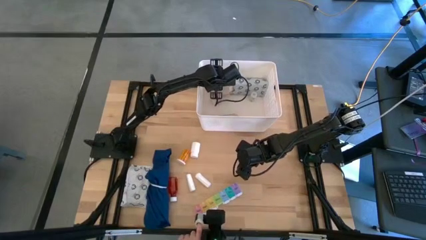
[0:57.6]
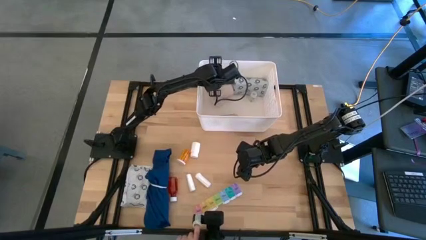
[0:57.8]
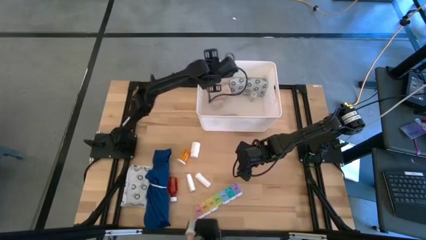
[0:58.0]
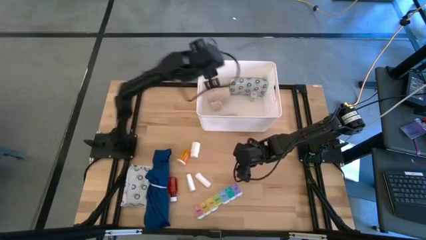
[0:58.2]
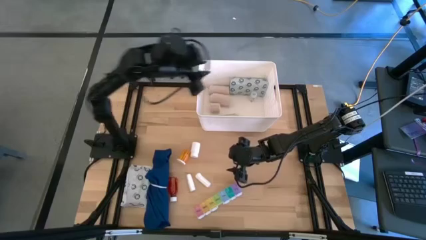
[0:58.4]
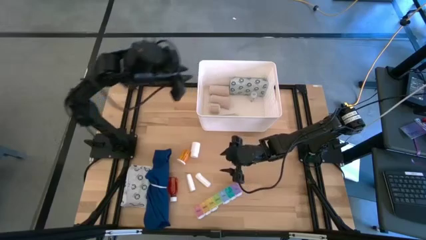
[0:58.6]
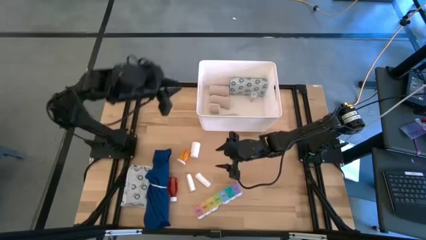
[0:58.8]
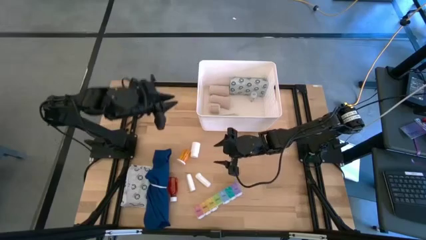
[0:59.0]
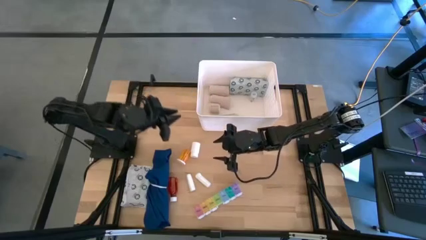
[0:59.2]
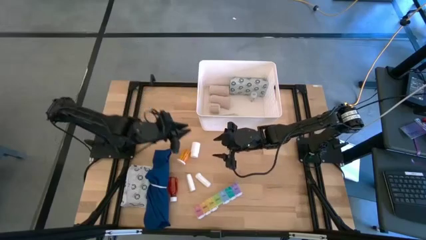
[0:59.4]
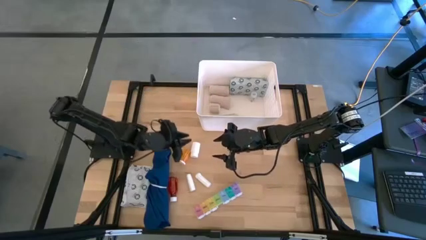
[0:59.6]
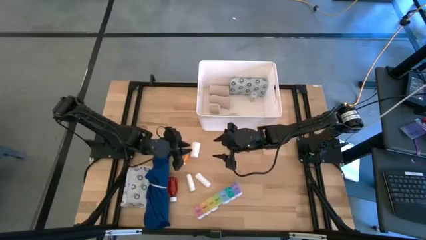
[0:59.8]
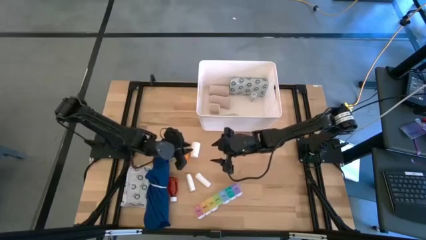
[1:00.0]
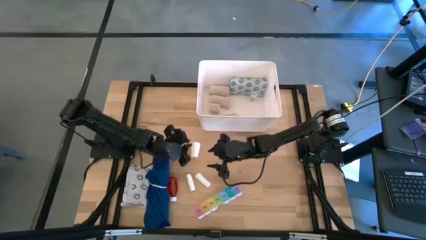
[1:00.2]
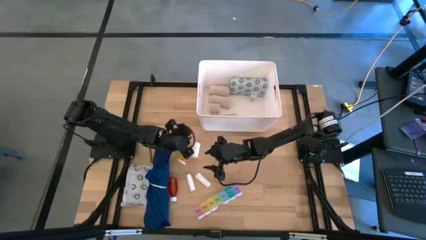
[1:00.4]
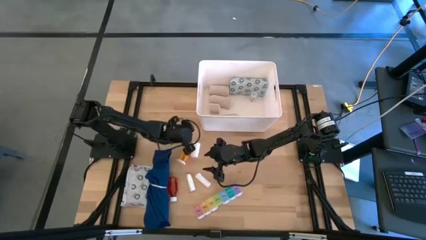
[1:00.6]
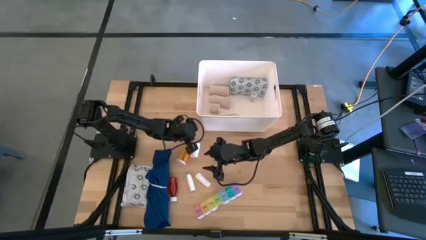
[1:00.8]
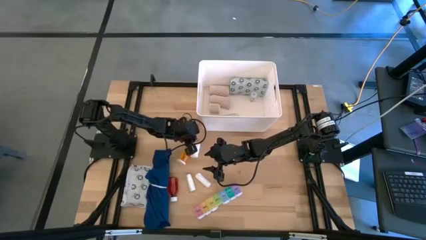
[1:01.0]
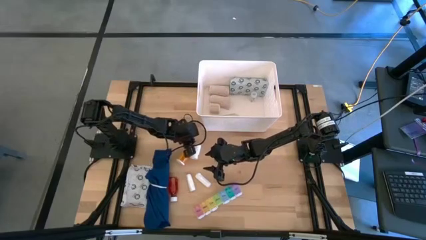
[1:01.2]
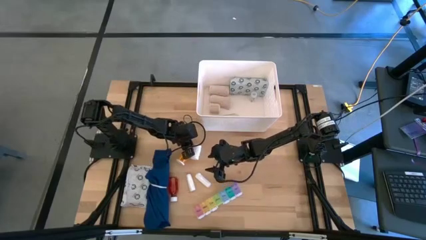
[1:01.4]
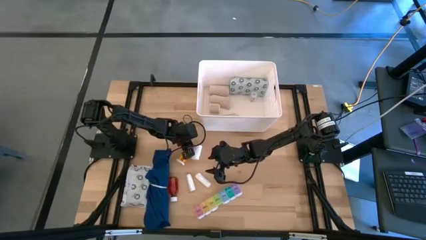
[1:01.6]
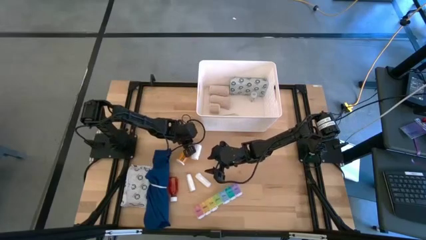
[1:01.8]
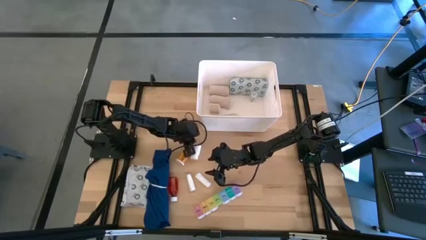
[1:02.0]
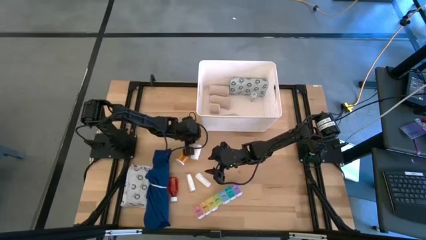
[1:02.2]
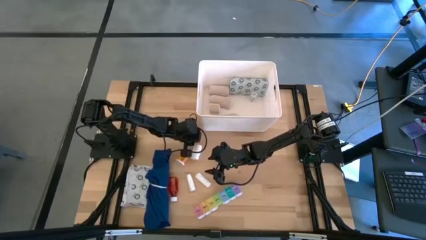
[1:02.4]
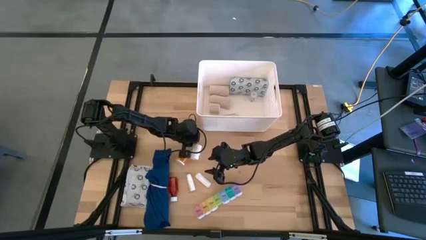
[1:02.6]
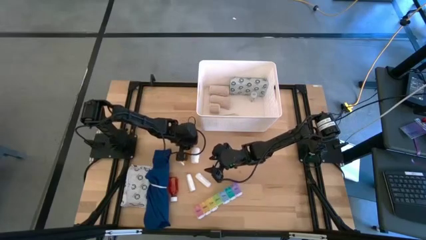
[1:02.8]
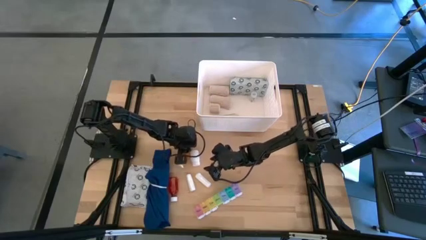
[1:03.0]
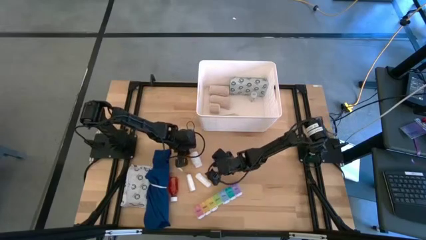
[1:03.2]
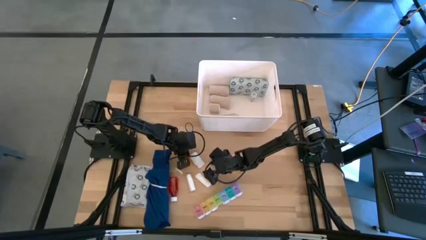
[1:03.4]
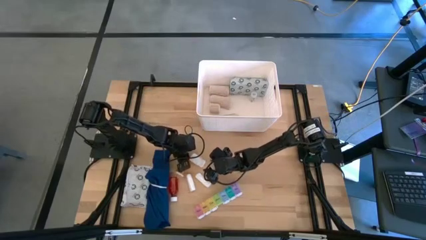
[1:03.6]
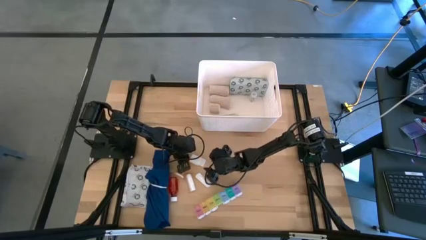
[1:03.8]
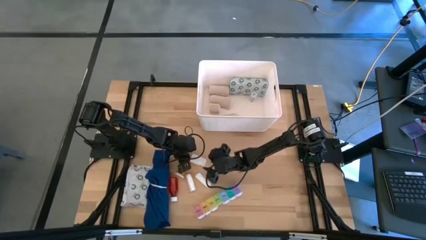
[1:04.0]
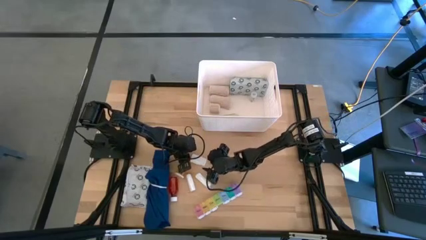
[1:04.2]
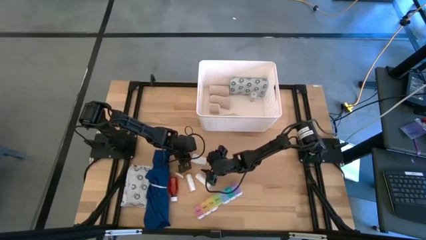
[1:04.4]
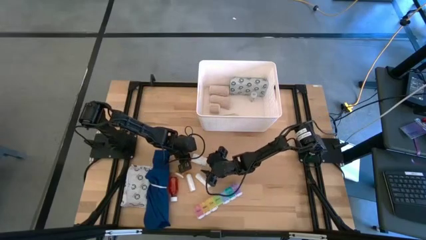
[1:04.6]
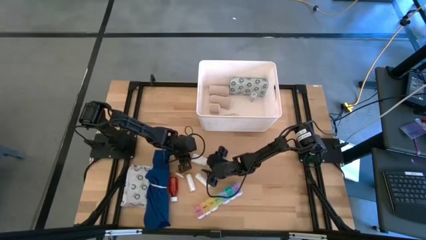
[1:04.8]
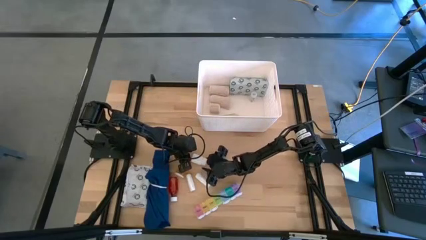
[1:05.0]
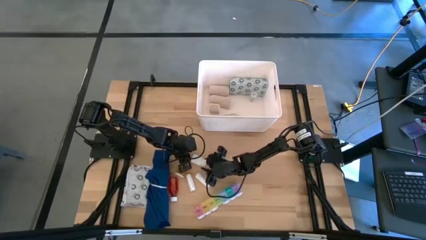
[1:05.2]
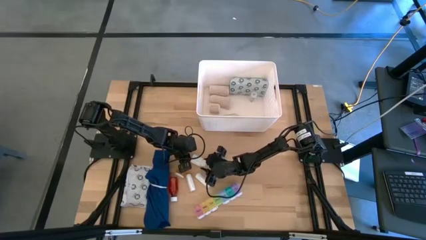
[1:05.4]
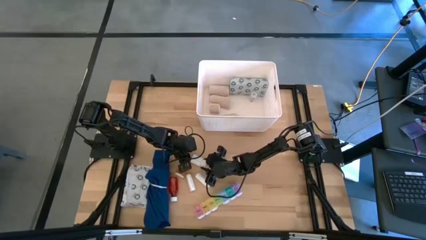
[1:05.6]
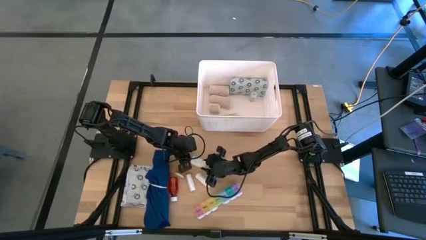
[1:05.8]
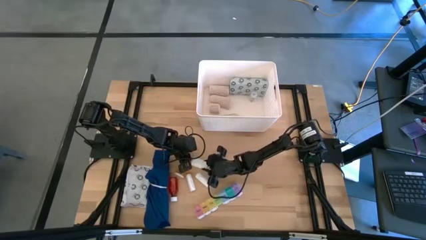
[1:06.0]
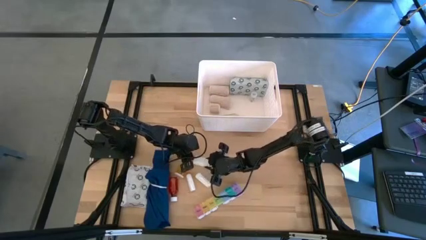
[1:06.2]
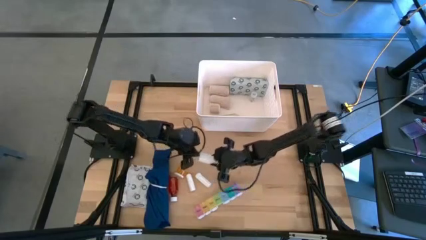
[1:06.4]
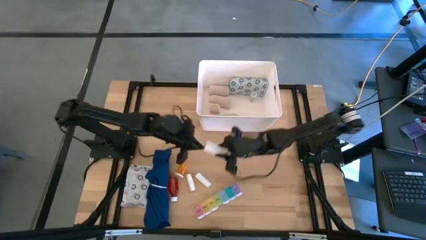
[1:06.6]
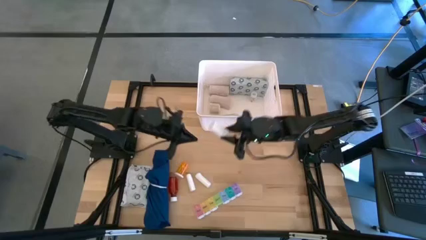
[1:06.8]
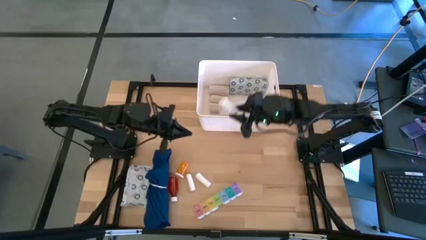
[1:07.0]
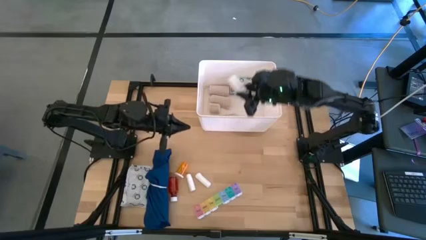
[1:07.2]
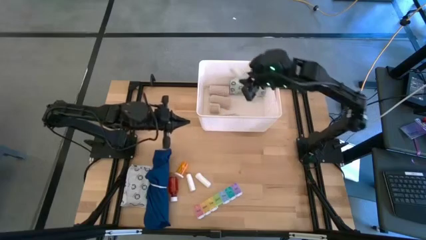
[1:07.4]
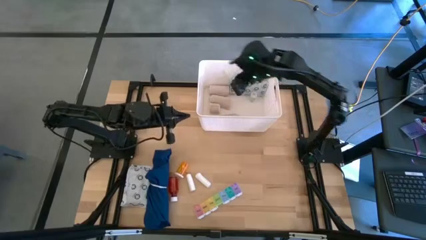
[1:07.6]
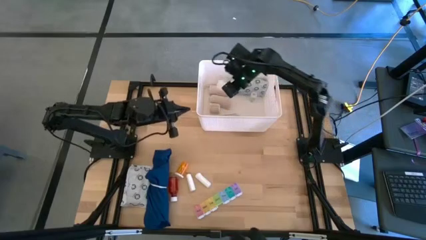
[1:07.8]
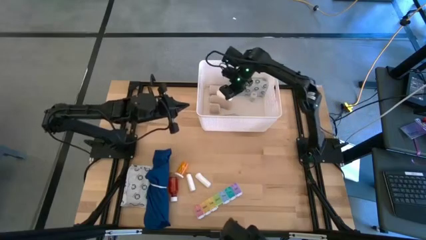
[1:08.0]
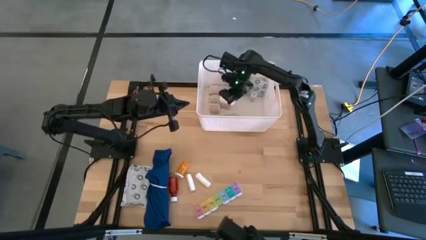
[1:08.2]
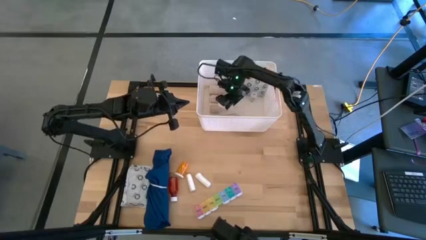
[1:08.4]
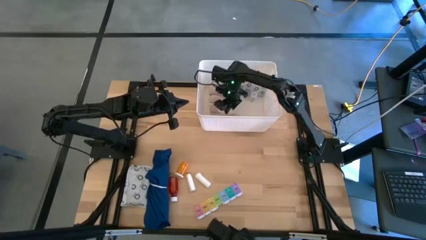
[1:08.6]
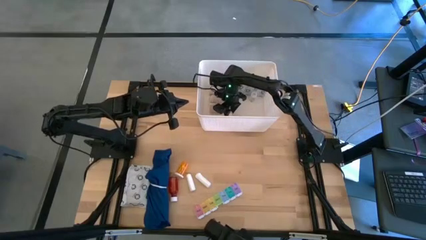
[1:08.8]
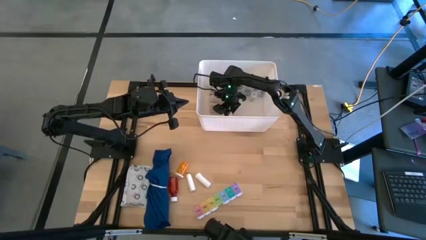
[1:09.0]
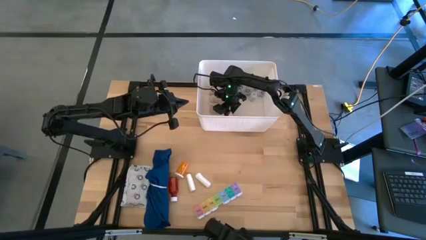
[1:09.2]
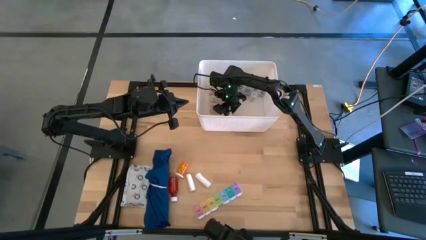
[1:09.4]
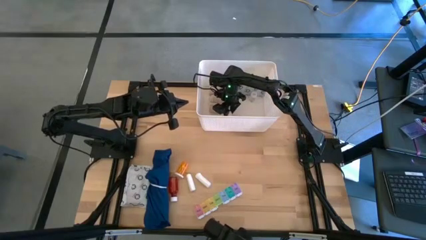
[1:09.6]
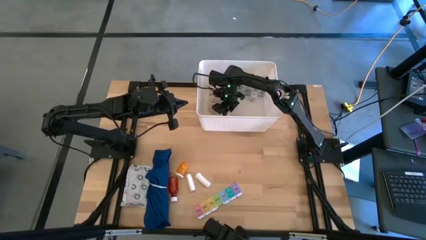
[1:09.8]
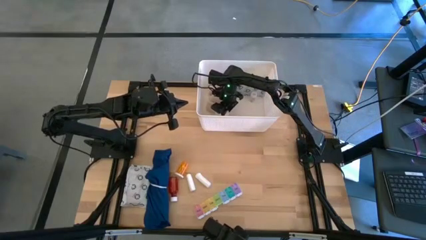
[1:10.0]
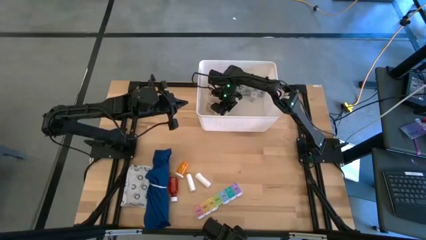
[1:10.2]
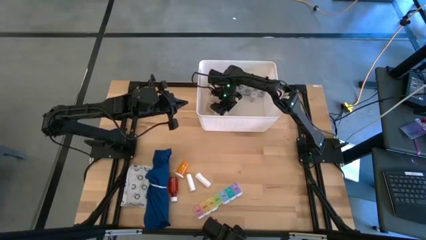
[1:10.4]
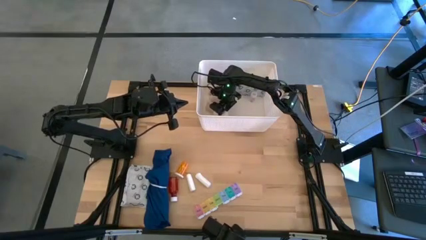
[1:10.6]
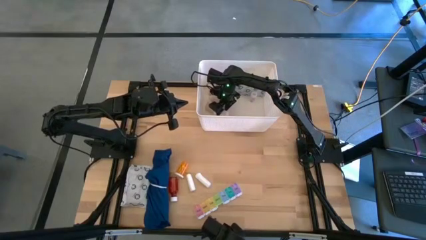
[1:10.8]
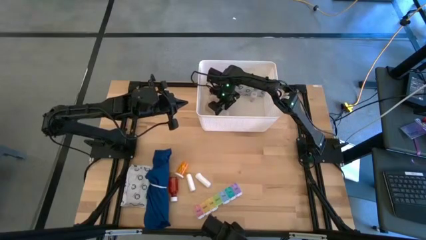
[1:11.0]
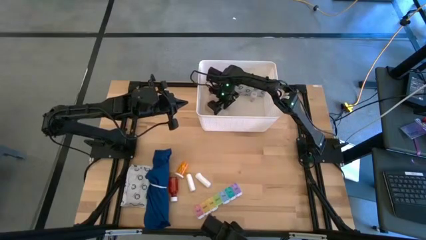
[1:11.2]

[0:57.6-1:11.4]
Task: Pick & place medical supplies in basket/bin
Put the white pill bottle into the white container

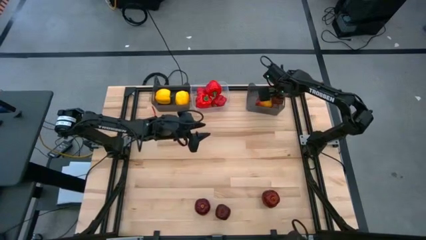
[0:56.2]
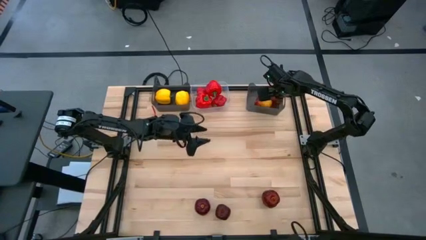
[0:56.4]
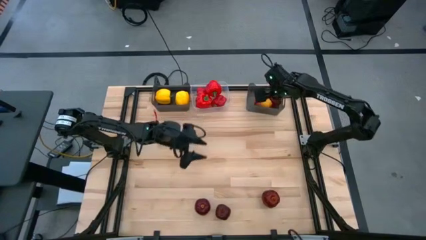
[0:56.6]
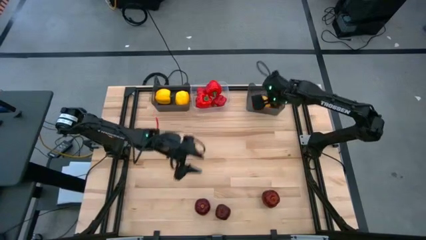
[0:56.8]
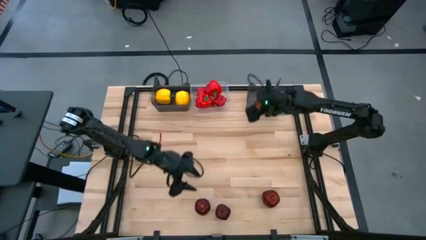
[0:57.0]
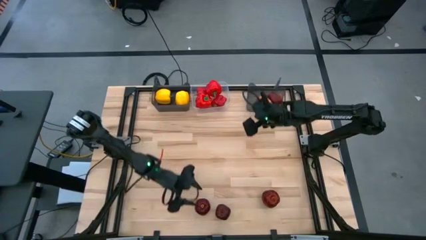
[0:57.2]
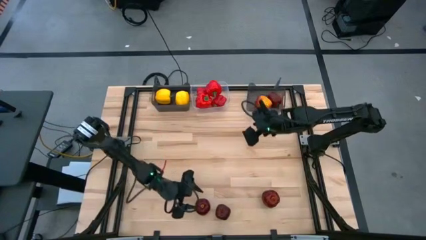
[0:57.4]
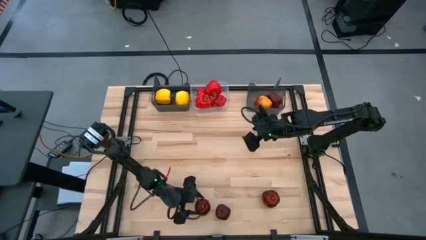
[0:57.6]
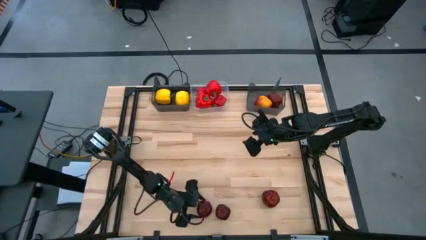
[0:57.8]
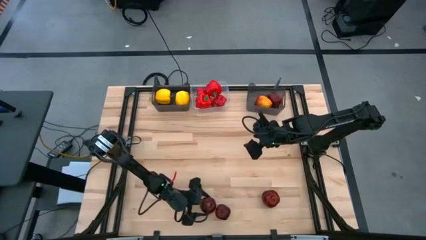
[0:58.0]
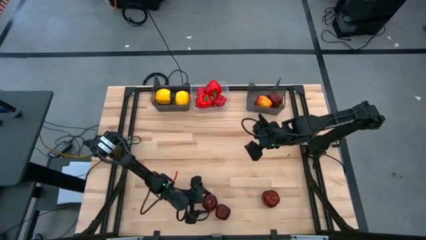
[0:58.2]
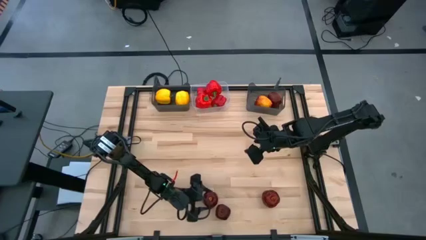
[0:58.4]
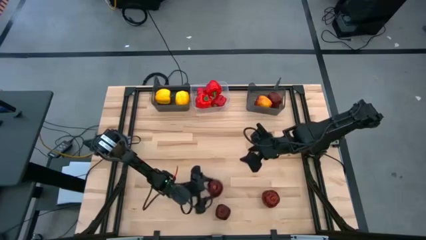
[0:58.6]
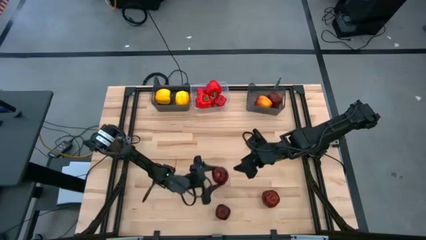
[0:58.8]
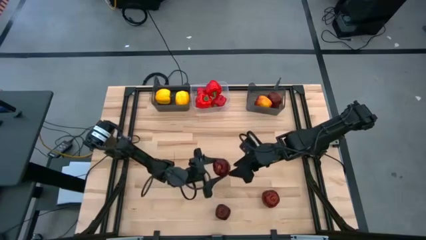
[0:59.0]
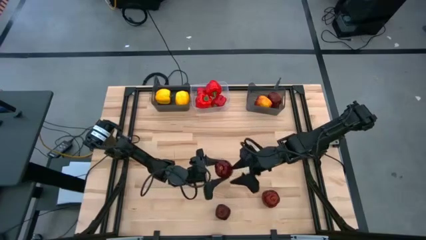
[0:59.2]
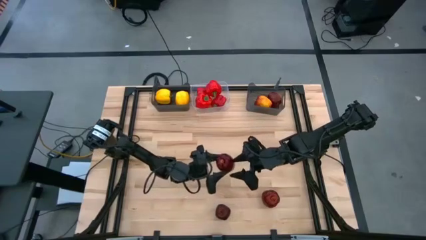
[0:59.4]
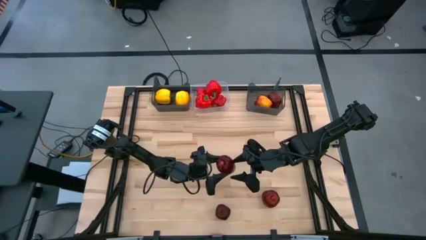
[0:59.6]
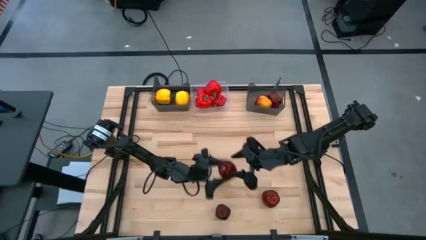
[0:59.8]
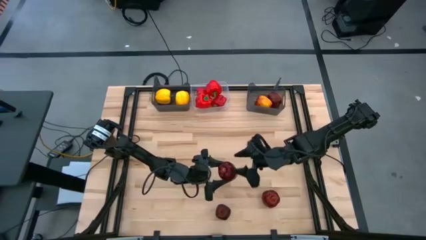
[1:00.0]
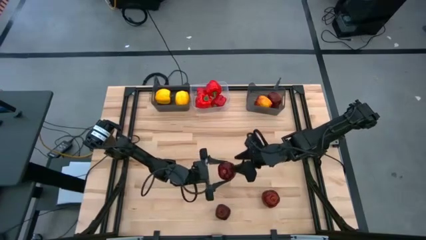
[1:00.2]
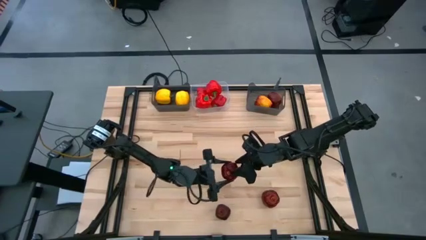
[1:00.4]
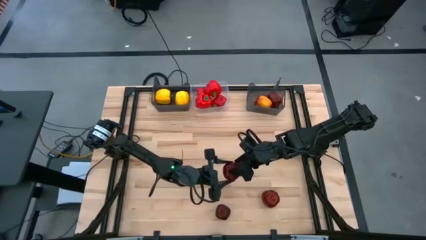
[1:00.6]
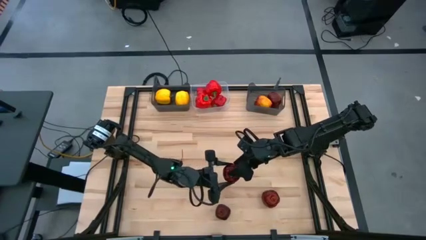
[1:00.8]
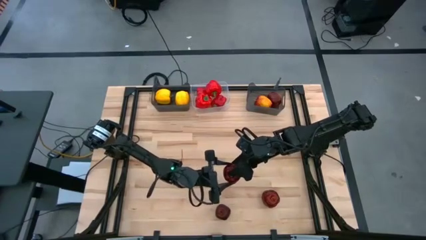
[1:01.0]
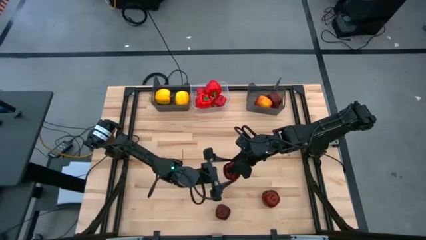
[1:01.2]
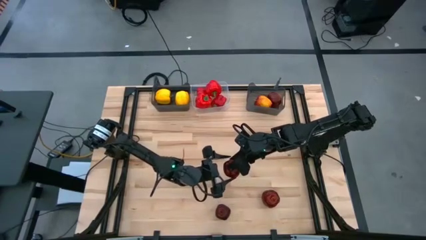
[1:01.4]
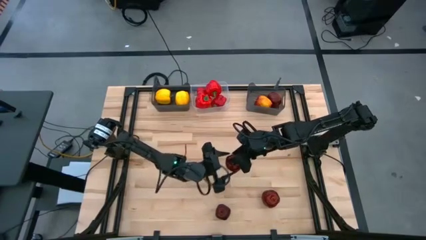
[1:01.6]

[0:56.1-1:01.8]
Task: Sort produce into baskets
Put the left red apple into the right black bin
